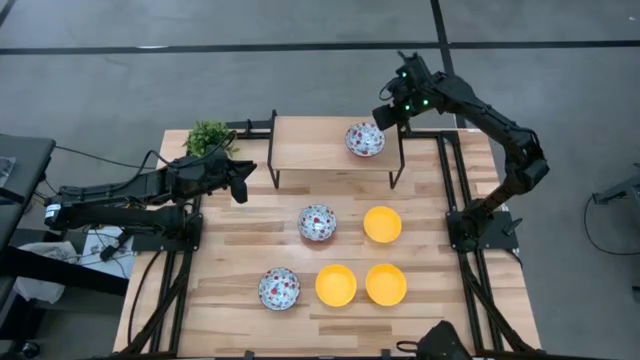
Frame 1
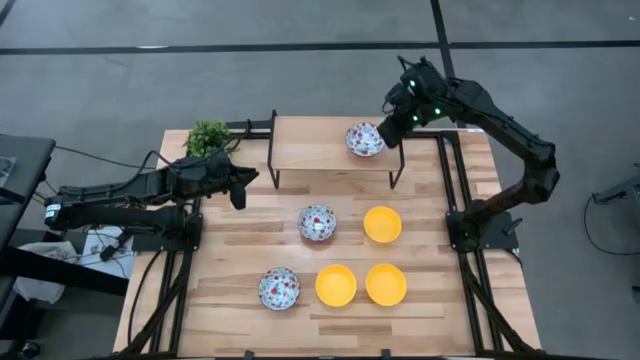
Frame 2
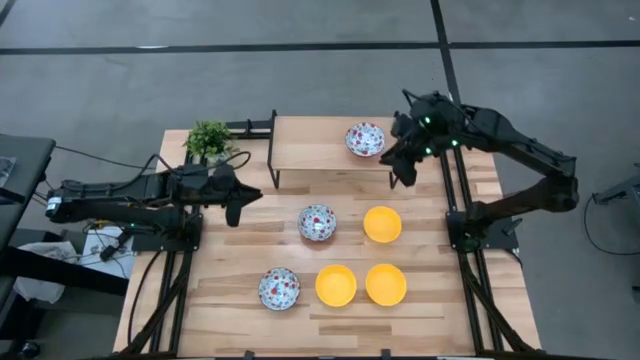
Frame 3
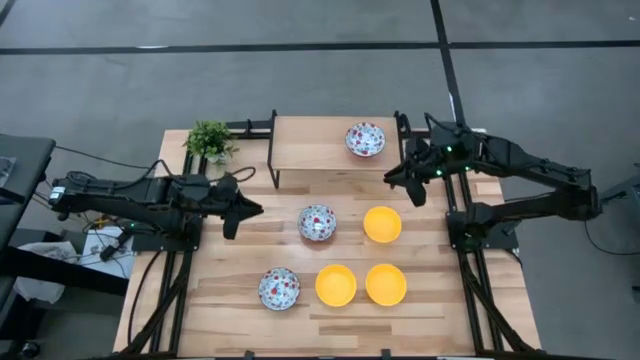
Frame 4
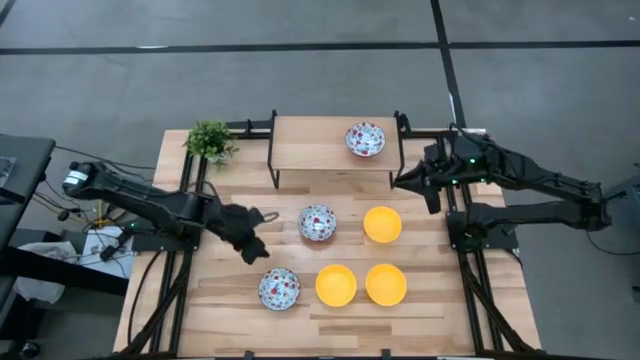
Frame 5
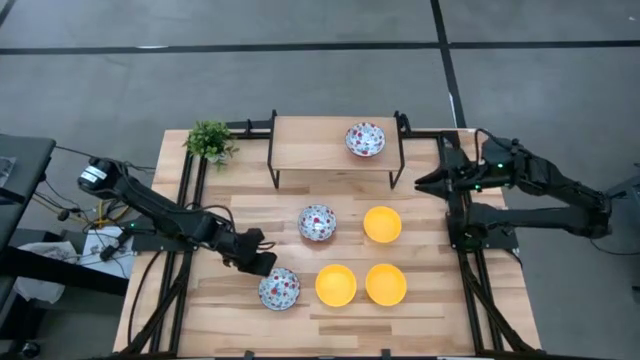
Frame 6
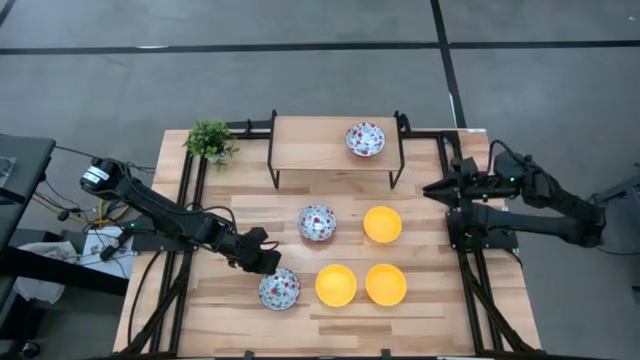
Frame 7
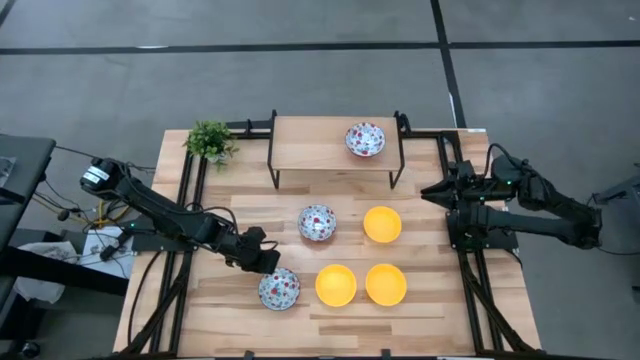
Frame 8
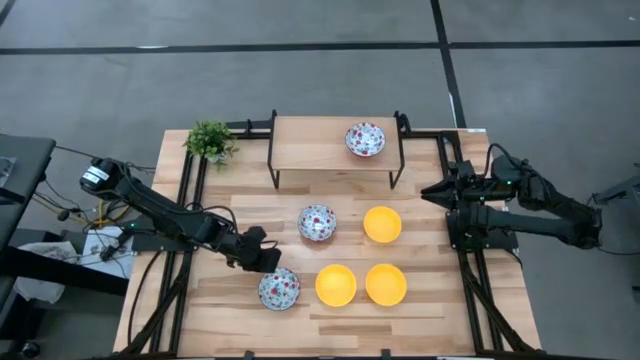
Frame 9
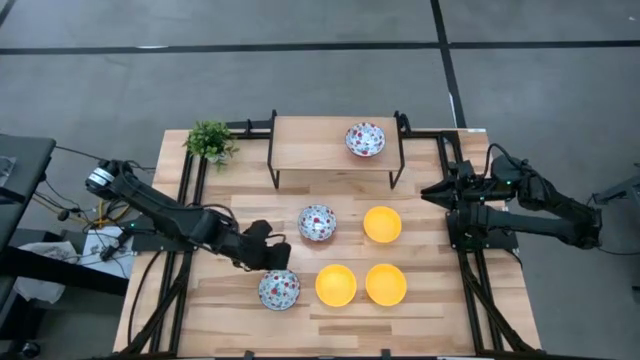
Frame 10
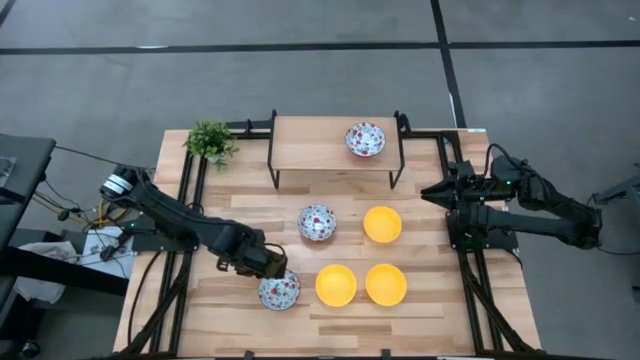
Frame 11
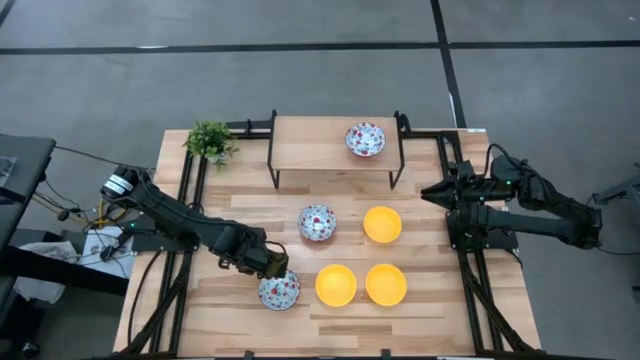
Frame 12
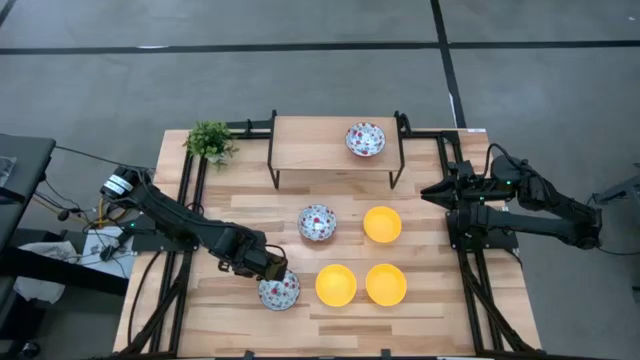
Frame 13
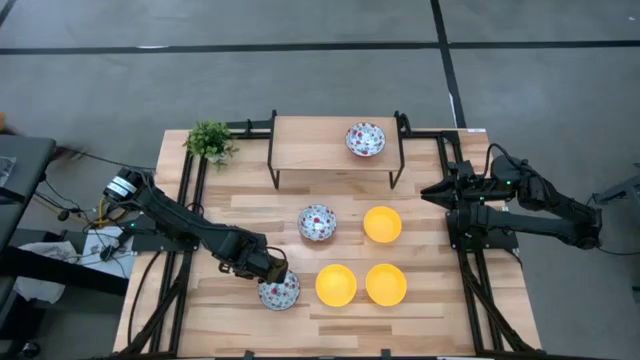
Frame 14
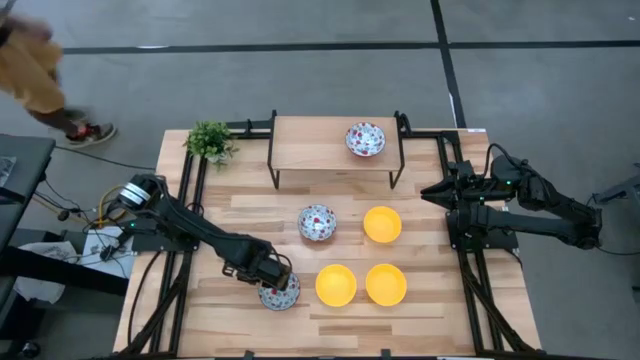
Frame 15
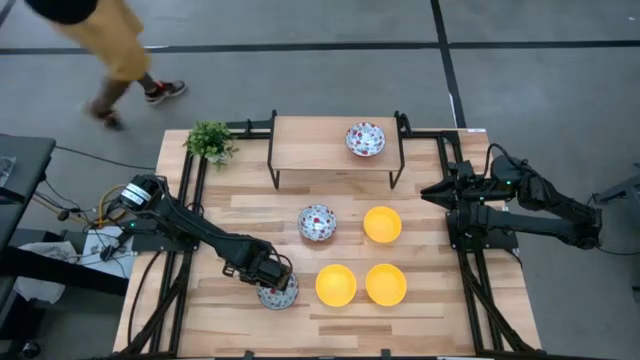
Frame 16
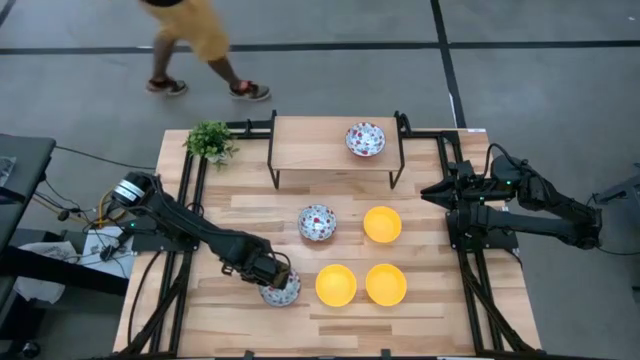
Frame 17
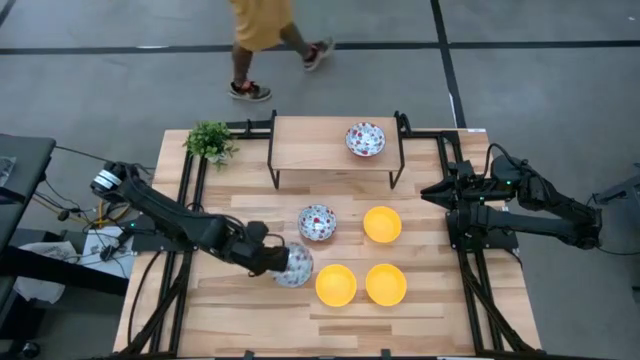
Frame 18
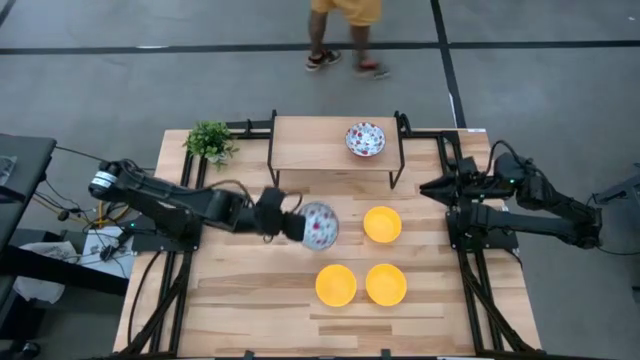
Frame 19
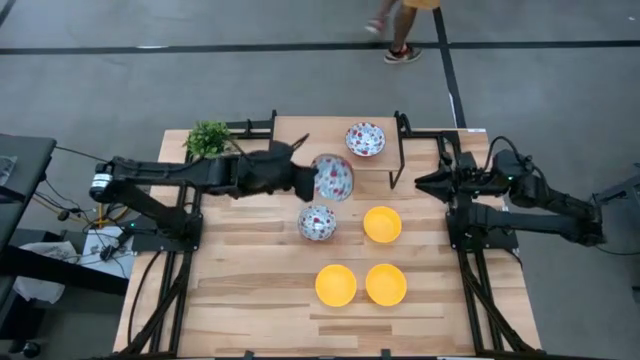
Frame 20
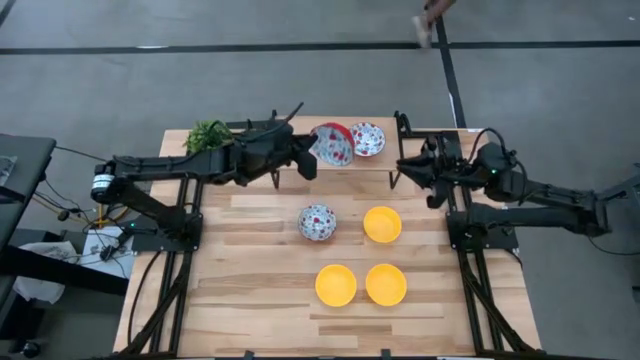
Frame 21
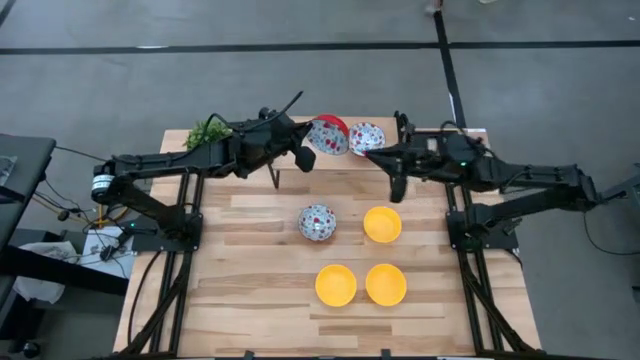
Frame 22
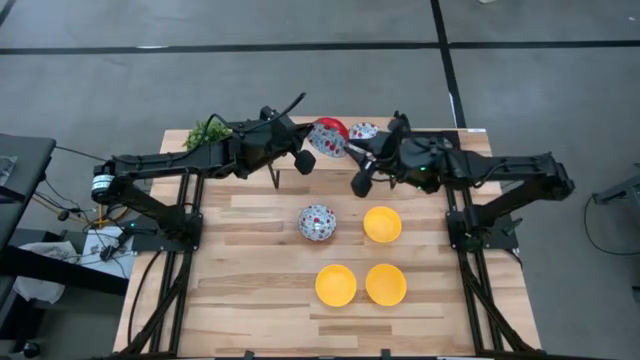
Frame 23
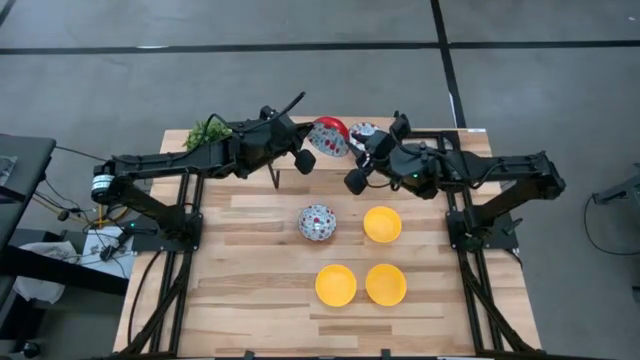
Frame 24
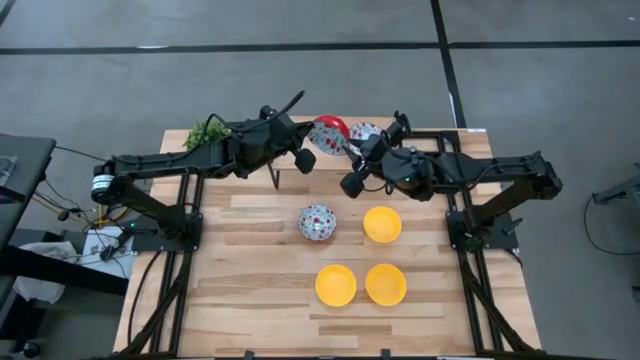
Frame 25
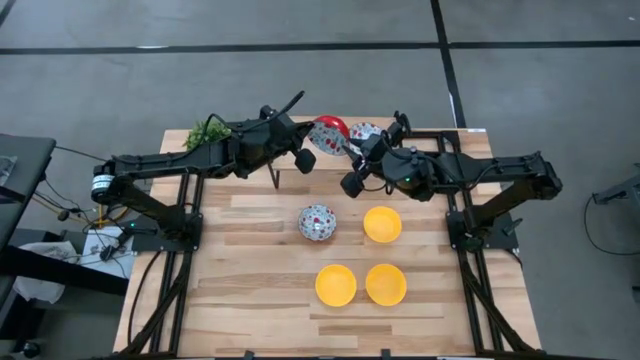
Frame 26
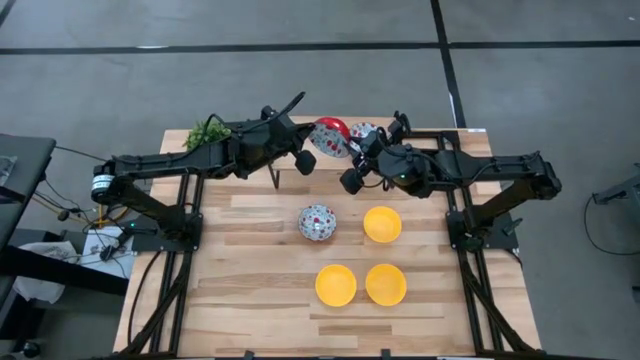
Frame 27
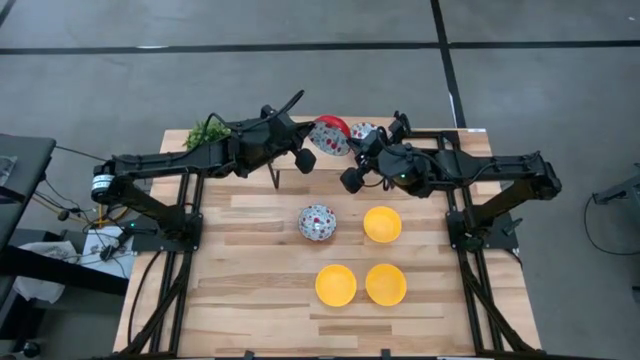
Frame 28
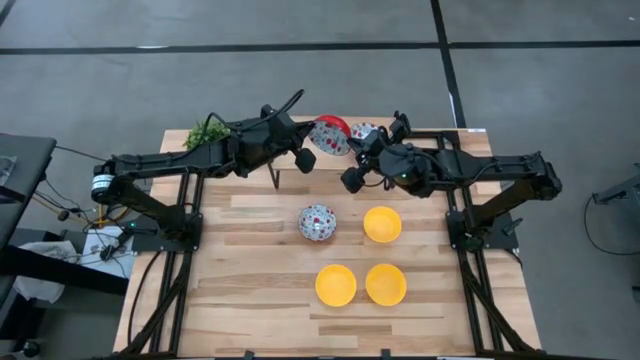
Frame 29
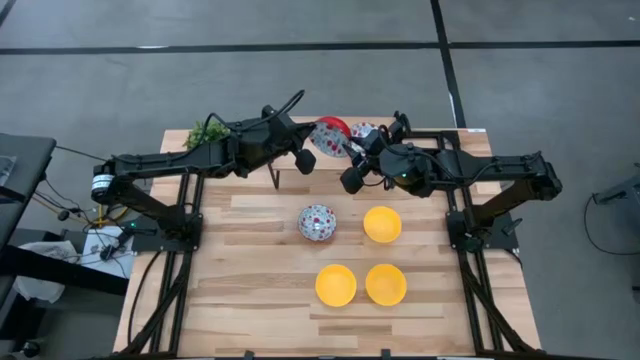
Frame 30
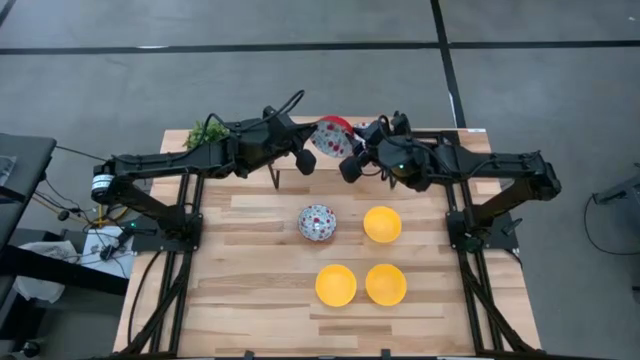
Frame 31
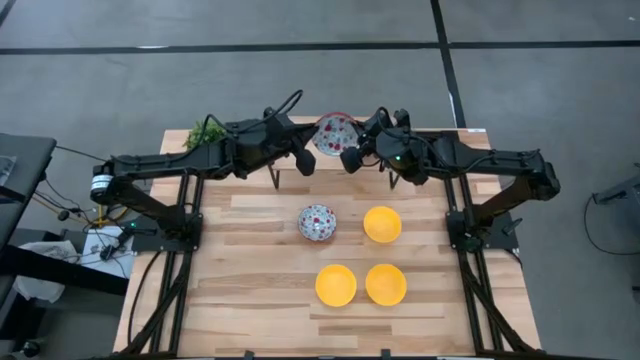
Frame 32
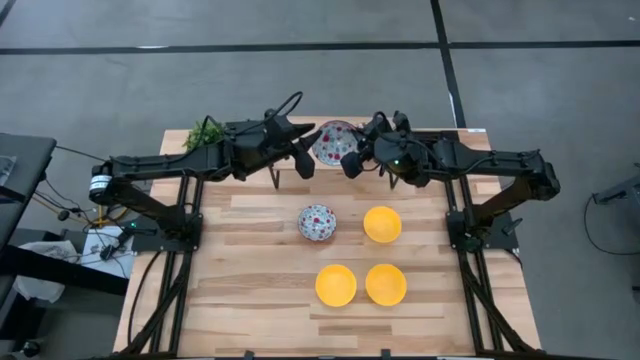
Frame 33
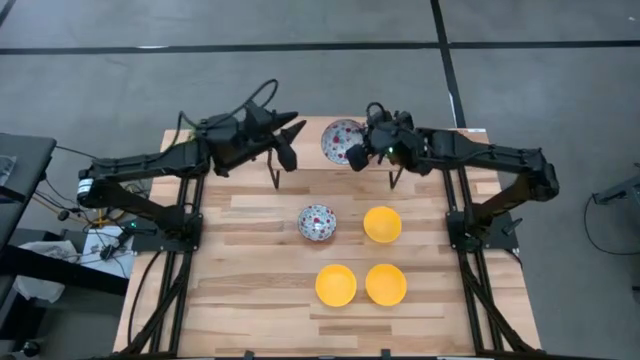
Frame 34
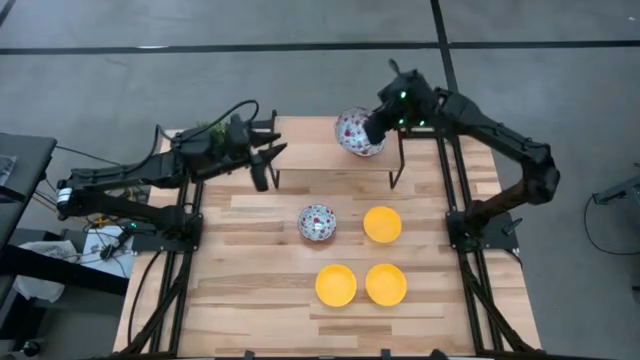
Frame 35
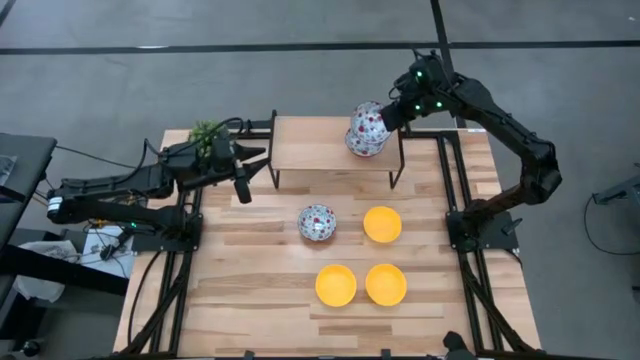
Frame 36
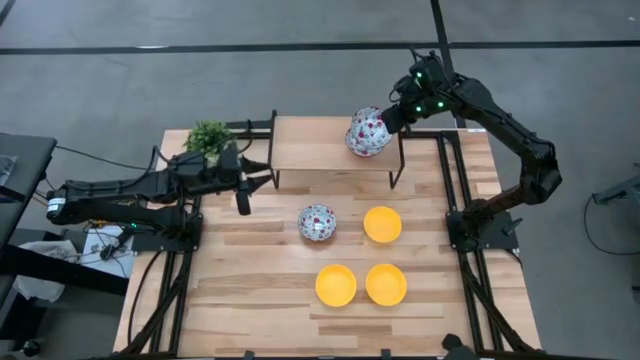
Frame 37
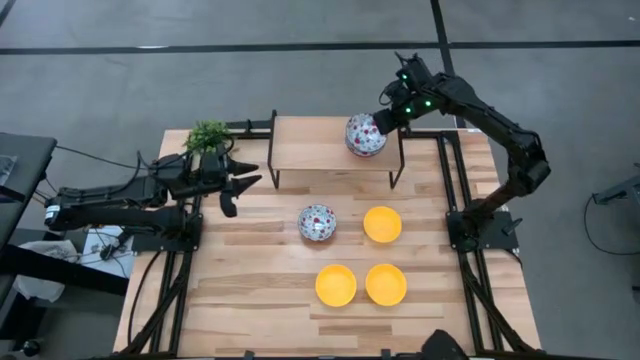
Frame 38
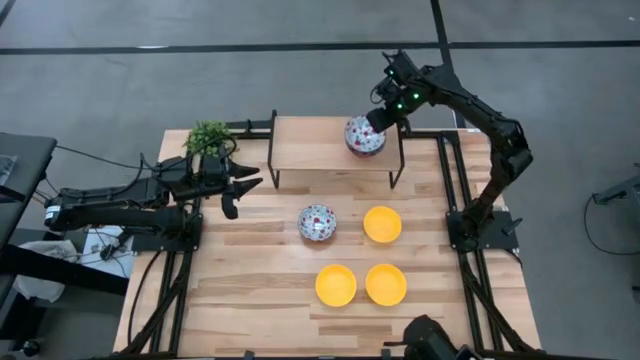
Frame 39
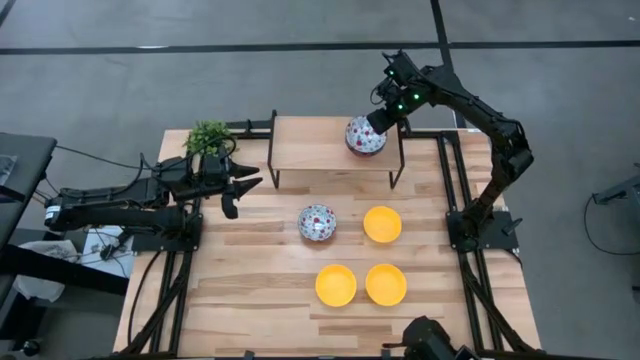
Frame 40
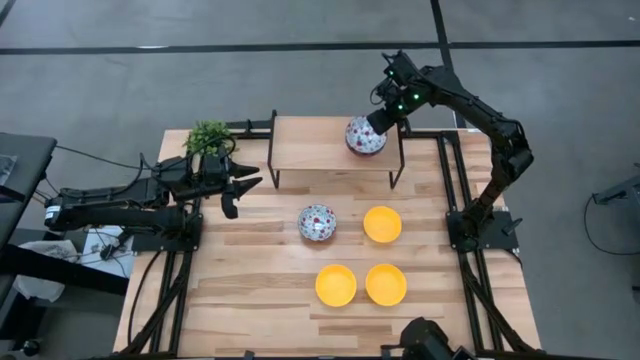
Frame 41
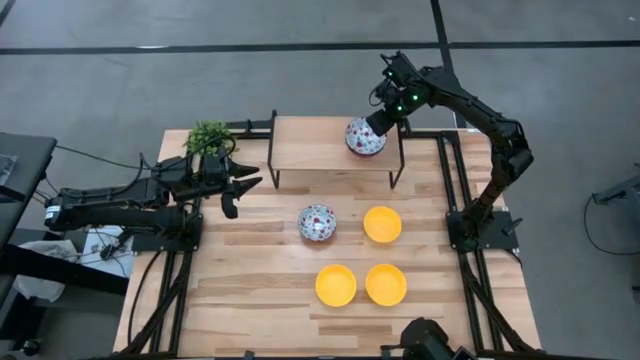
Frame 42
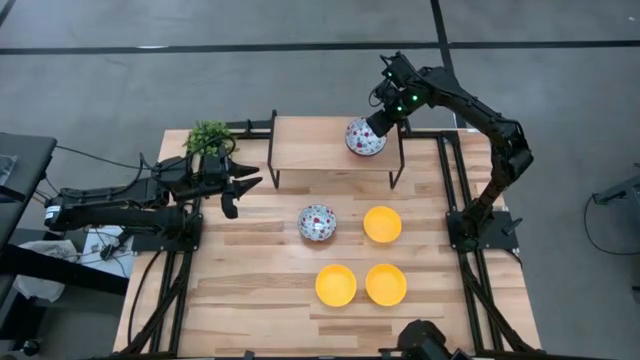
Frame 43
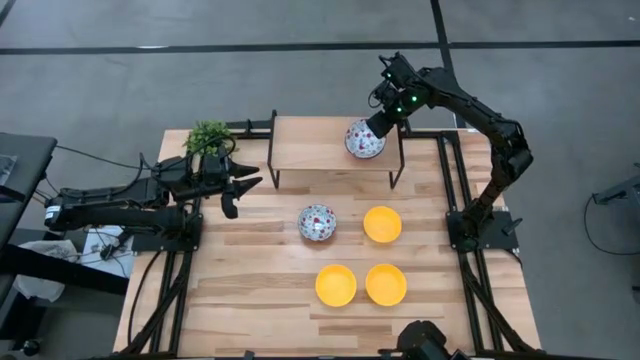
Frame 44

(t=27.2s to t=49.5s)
Task: Pick & Place Mini bowls
Stack the bottom white bowl on top of the white bowl on the shelf
